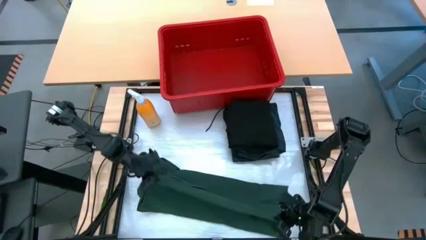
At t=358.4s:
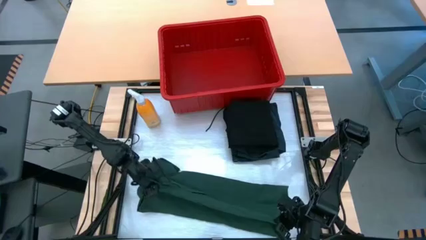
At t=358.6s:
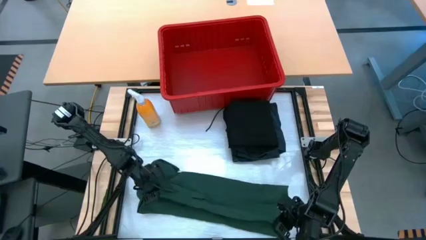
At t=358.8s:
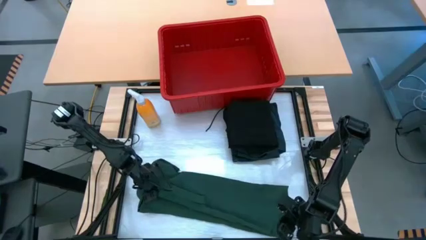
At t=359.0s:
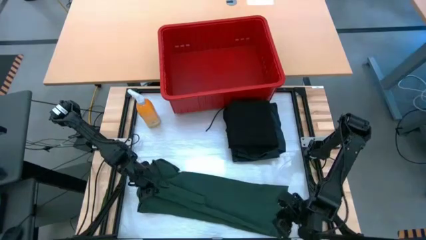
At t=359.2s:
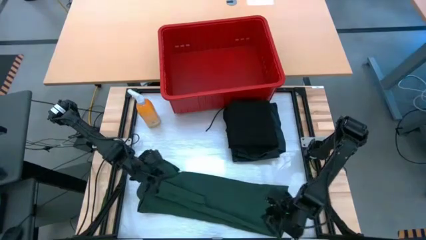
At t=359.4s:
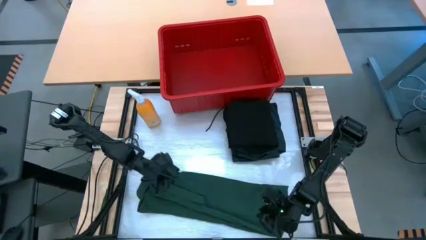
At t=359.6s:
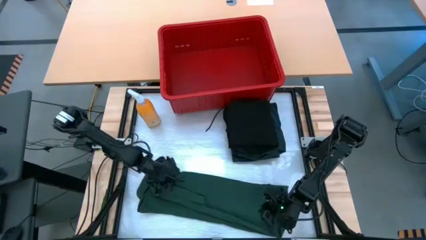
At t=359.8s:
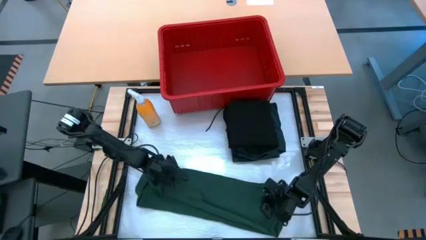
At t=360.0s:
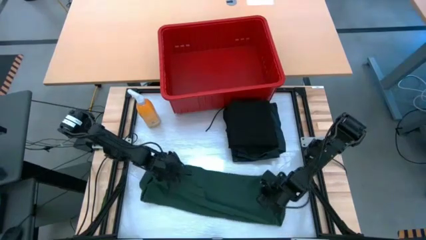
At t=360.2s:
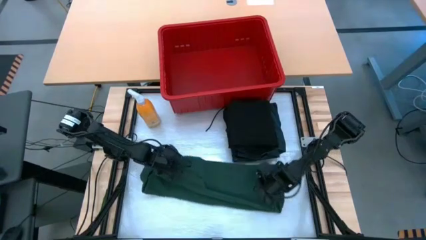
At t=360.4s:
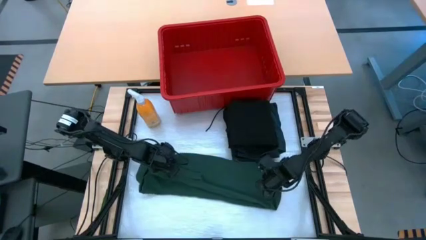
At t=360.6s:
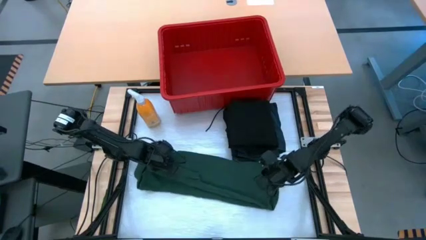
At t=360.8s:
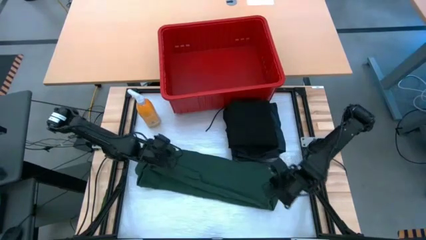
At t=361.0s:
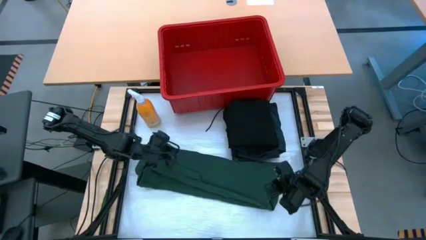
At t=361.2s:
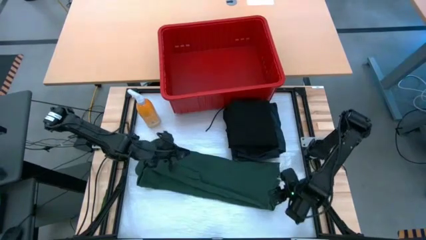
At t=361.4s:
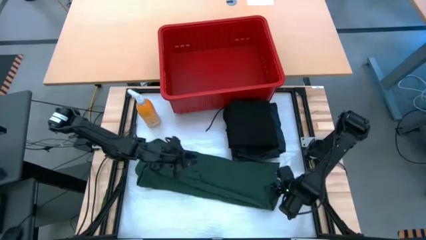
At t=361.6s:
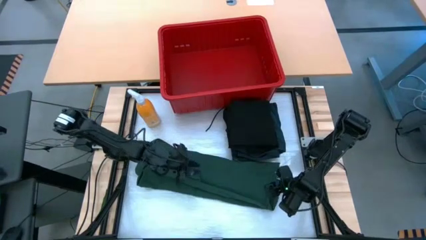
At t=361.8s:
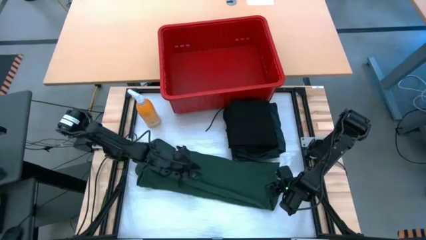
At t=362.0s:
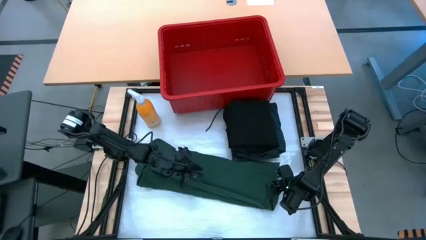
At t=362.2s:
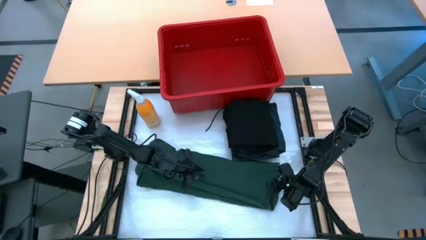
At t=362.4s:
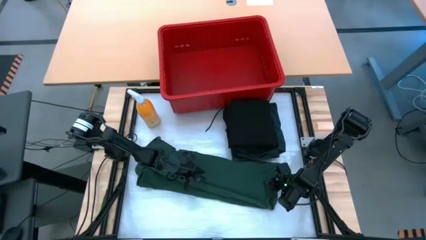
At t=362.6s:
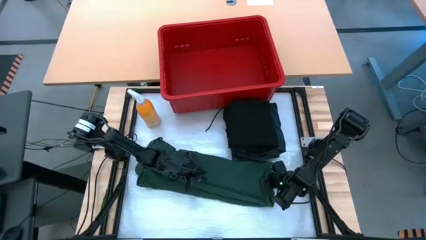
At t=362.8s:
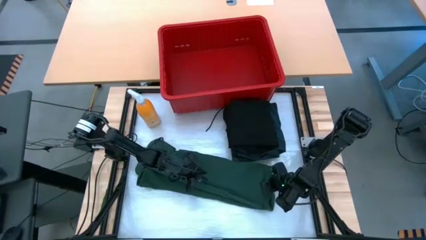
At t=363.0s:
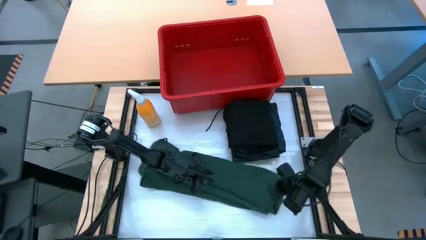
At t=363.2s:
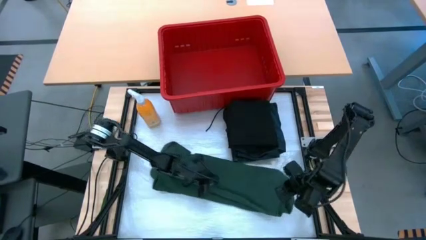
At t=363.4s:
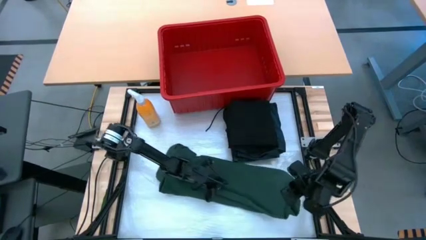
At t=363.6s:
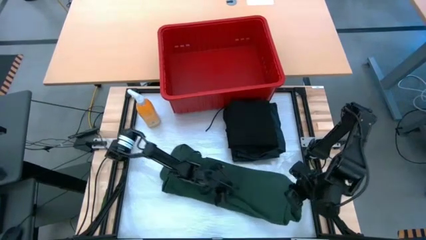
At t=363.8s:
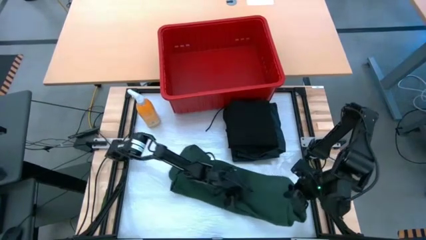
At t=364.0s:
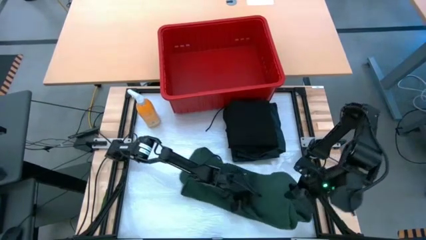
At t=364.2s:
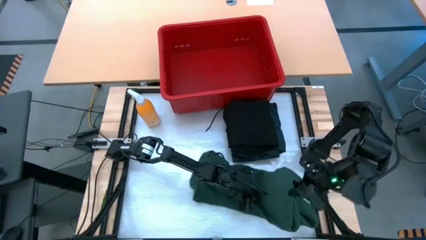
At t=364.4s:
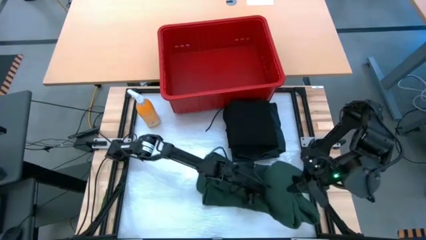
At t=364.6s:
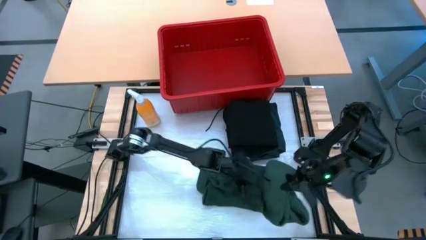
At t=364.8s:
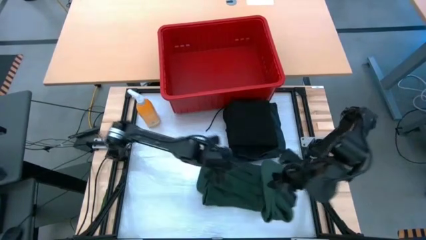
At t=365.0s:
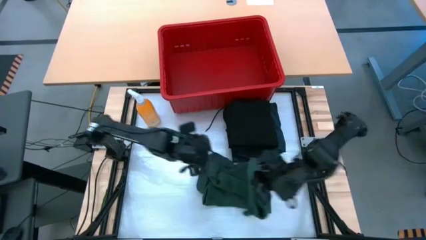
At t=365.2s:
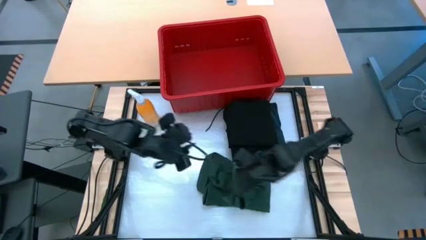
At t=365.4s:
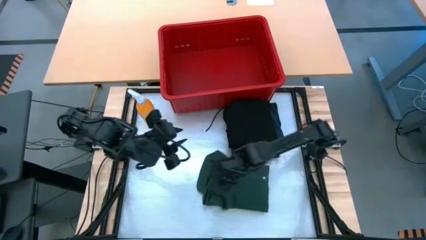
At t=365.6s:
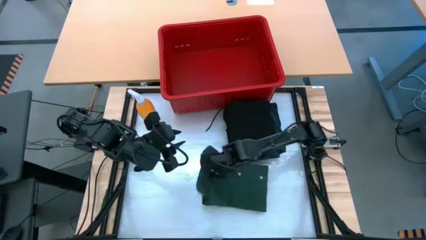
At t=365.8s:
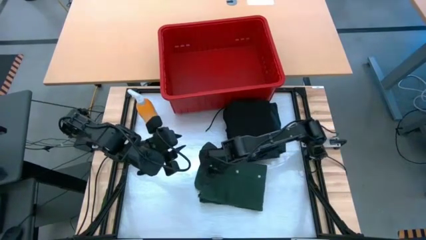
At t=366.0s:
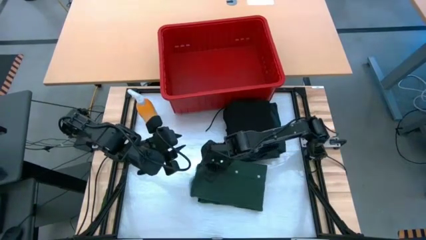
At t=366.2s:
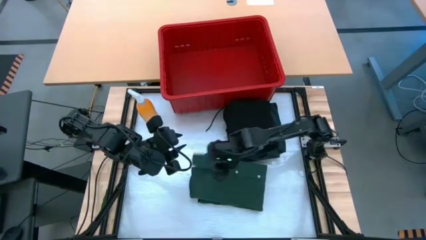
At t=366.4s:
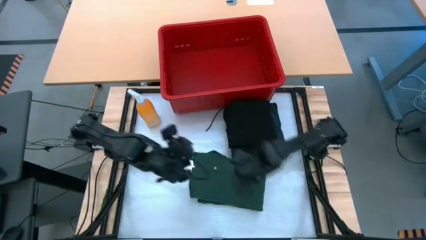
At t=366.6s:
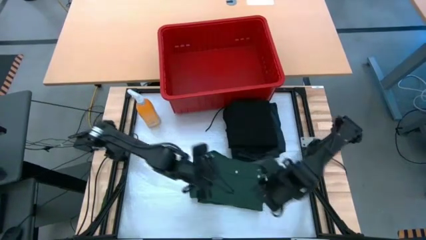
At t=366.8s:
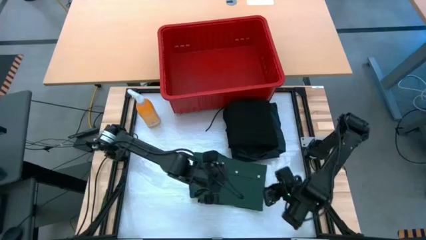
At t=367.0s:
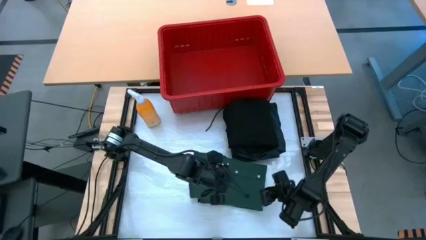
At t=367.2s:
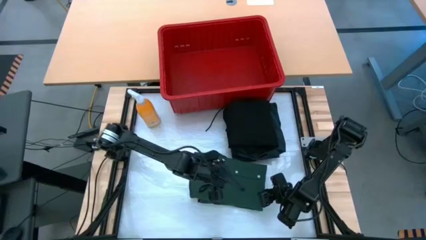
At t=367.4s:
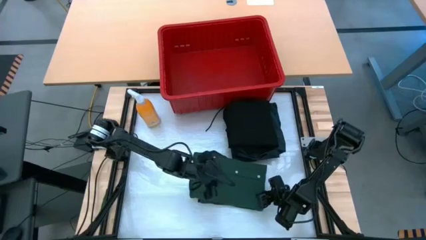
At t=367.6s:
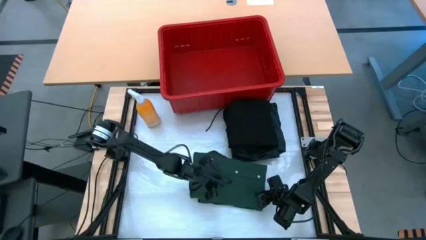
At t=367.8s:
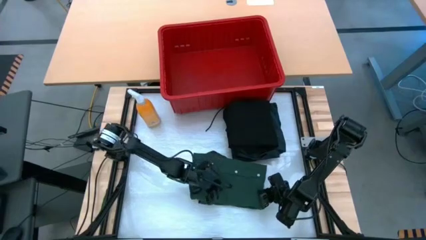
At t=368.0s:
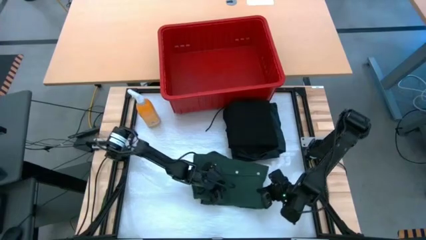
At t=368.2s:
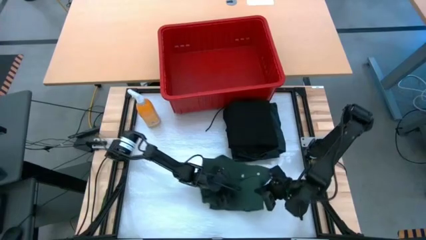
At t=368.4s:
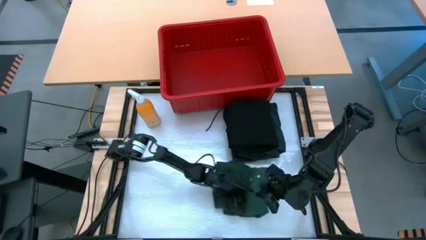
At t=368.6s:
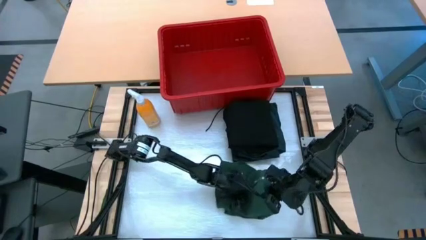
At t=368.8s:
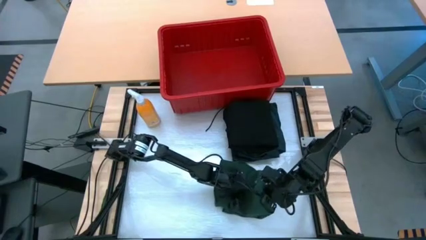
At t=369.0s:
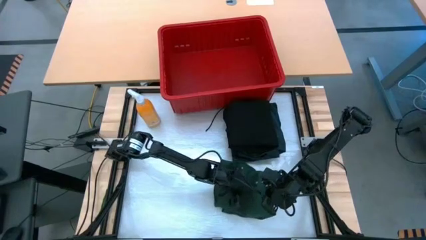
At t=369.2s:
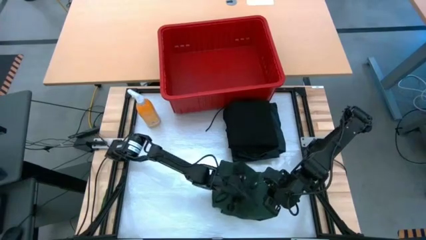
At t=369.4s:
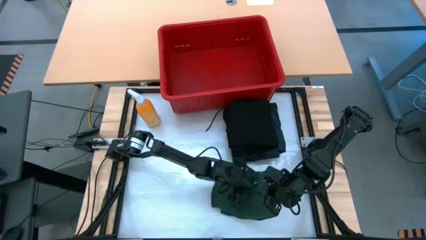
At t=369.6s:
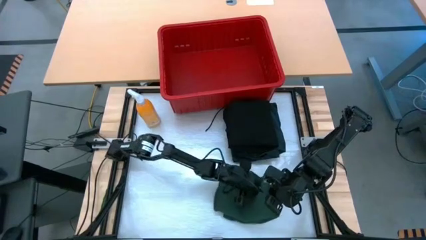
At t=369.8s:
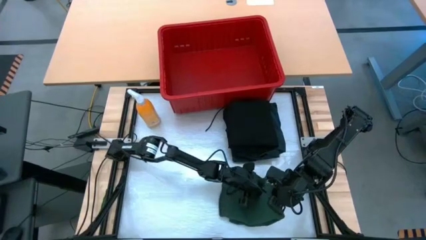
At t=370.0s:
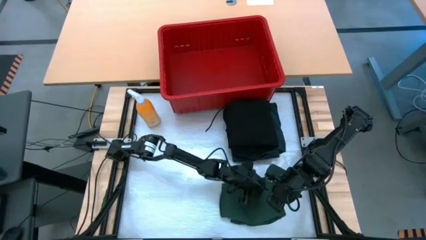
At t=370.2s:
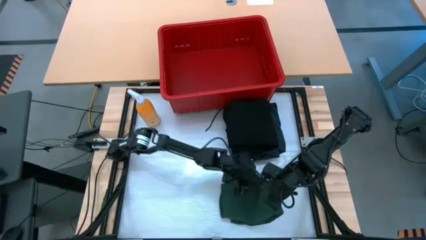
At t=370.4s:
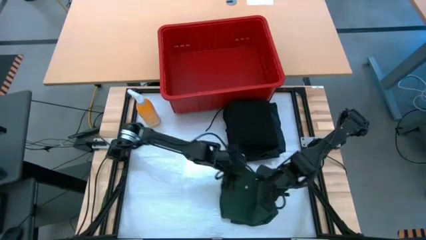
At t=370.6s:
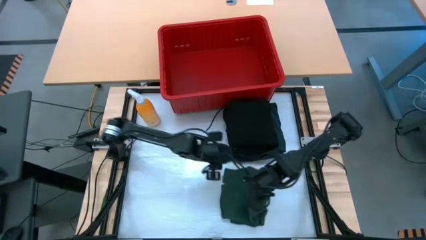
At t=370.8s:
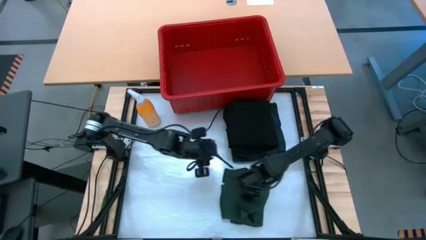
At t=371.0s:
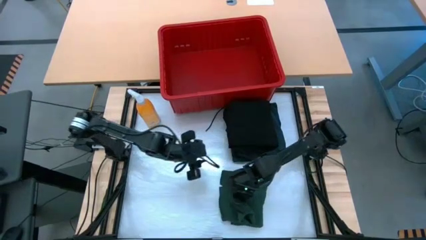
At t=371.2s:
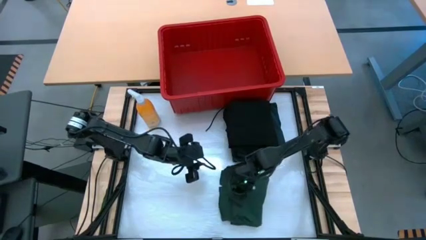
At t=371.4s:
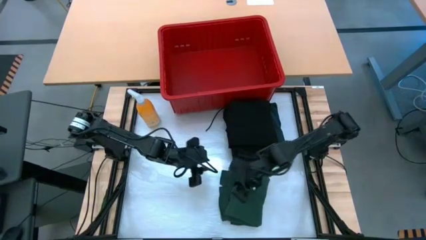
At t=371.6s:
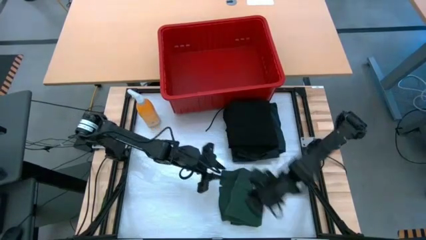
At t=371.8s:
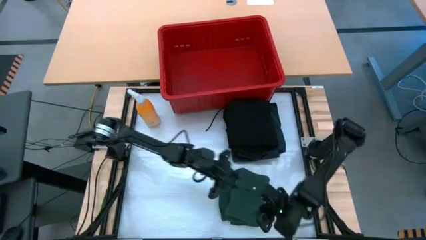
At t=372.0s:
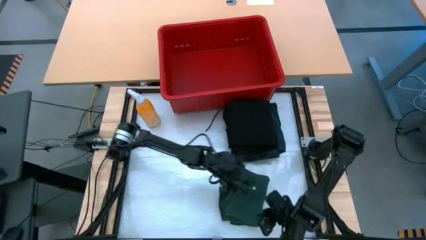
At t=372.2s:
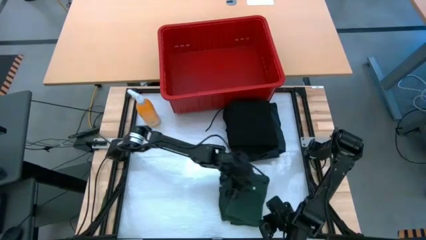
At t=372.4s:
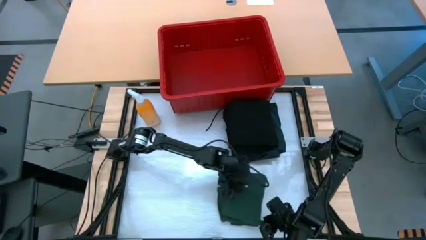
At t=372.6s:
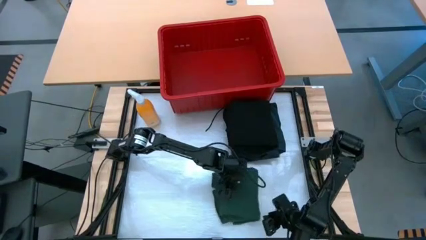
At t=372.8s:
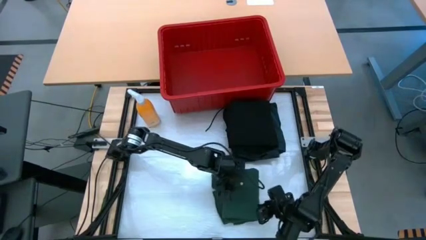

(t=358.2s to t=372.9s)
Task: Fold Laundry from Bin
Fold the green polo shirt
